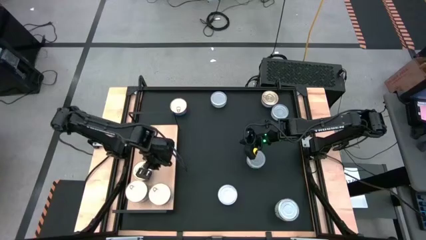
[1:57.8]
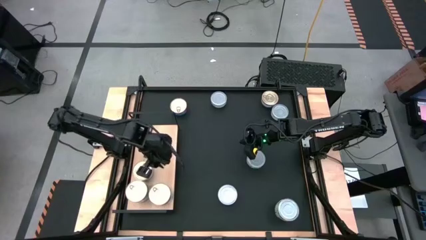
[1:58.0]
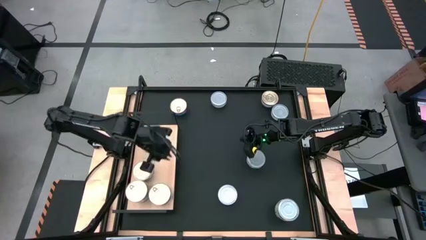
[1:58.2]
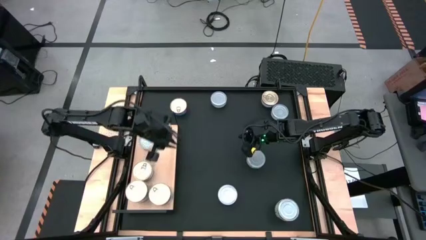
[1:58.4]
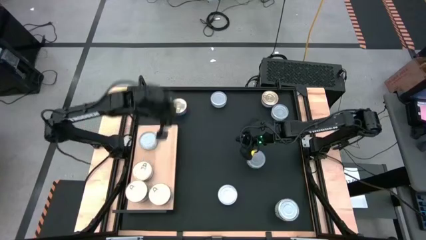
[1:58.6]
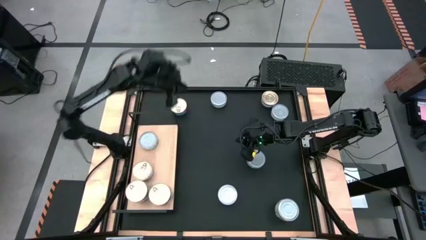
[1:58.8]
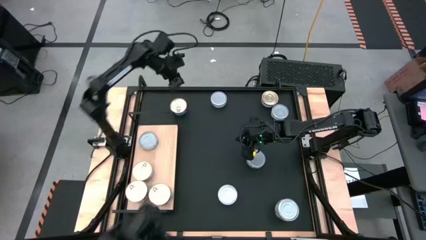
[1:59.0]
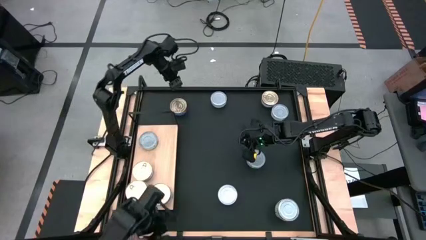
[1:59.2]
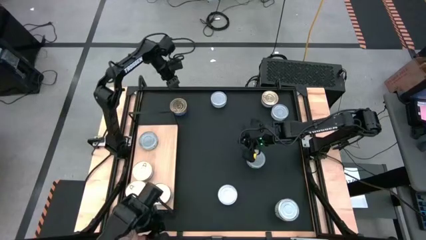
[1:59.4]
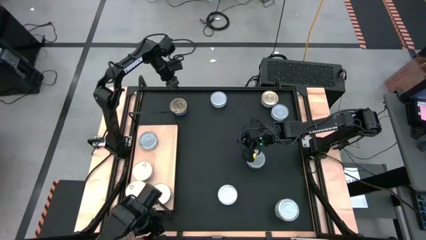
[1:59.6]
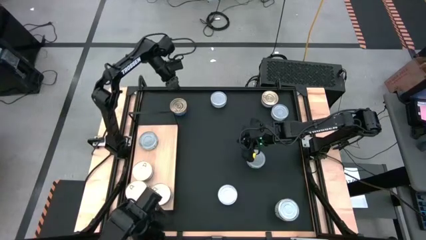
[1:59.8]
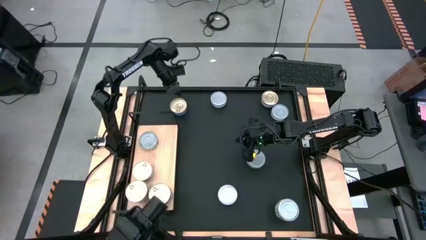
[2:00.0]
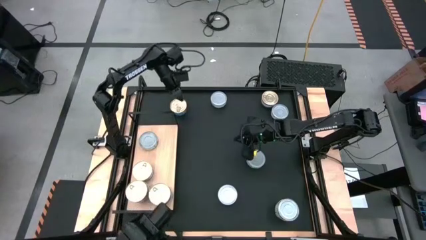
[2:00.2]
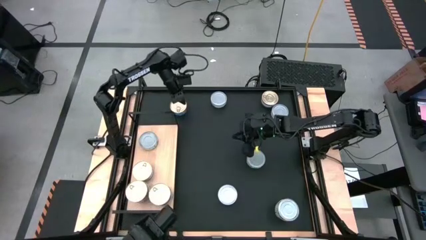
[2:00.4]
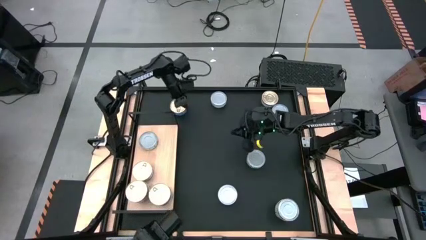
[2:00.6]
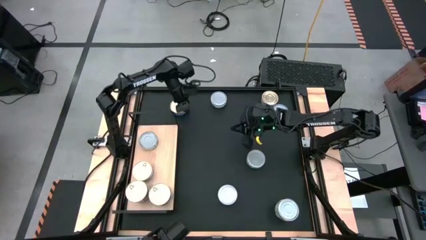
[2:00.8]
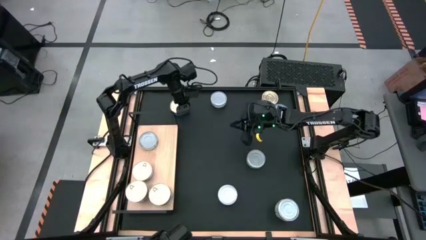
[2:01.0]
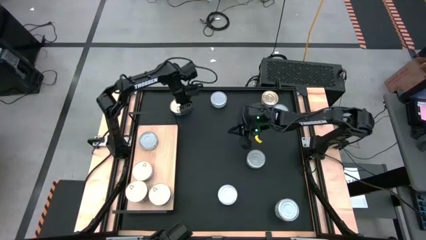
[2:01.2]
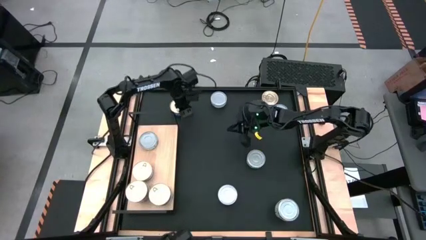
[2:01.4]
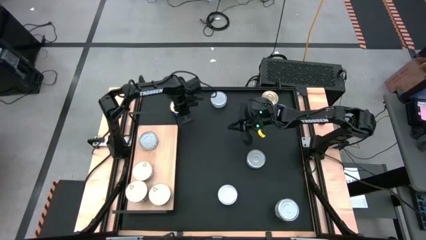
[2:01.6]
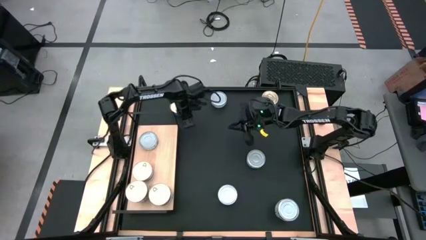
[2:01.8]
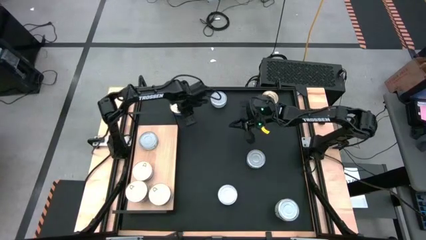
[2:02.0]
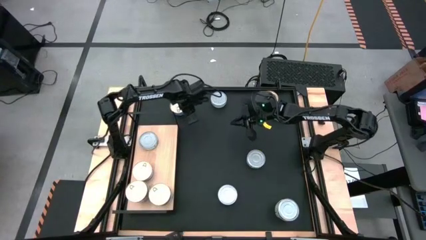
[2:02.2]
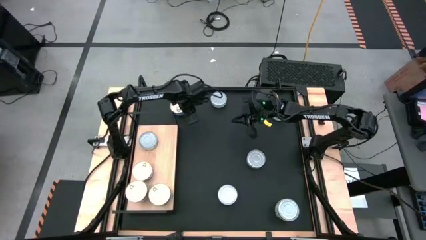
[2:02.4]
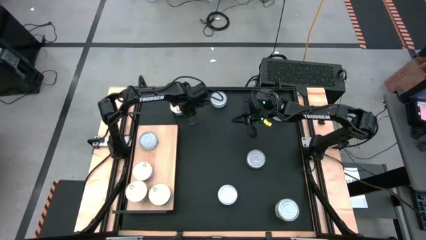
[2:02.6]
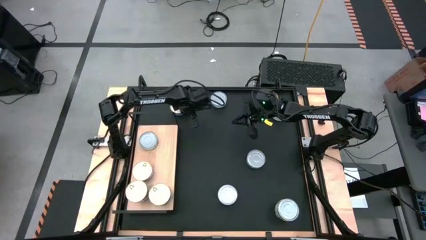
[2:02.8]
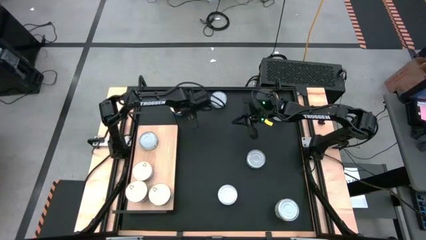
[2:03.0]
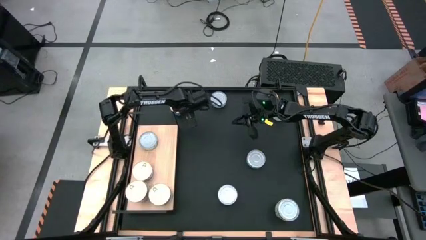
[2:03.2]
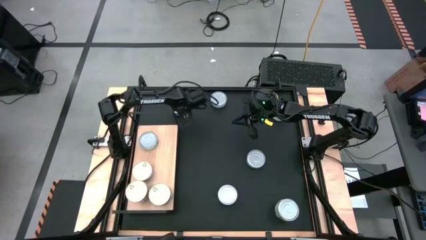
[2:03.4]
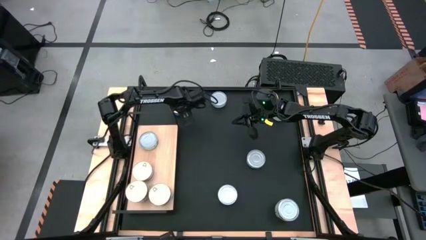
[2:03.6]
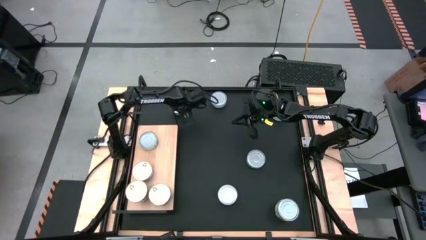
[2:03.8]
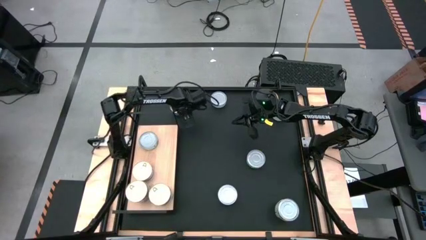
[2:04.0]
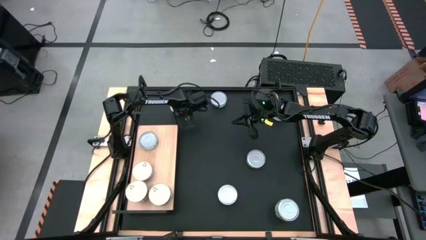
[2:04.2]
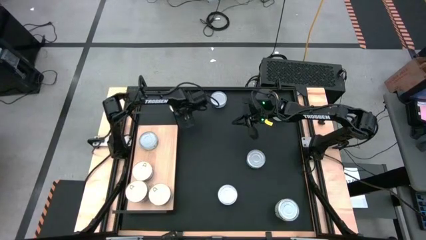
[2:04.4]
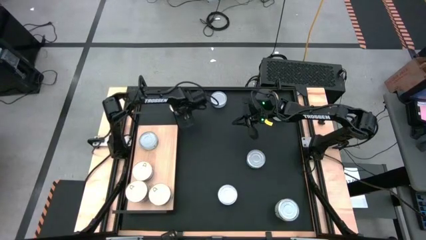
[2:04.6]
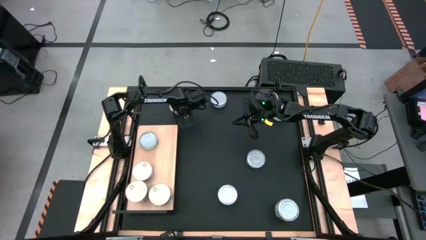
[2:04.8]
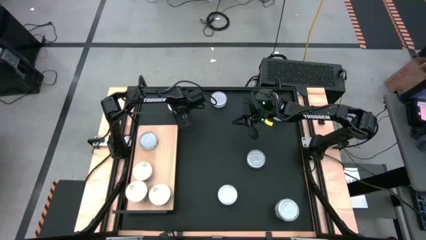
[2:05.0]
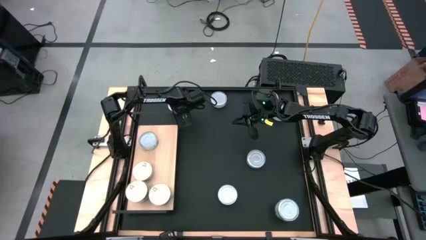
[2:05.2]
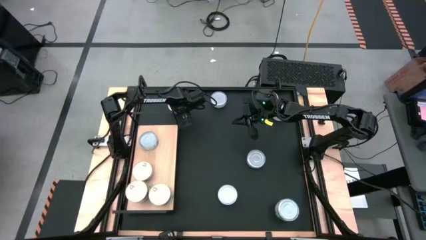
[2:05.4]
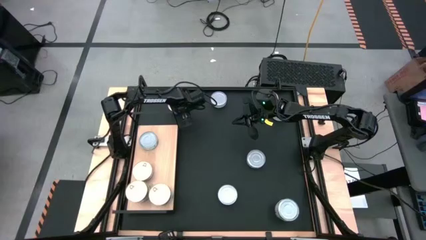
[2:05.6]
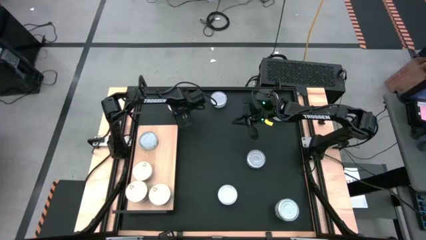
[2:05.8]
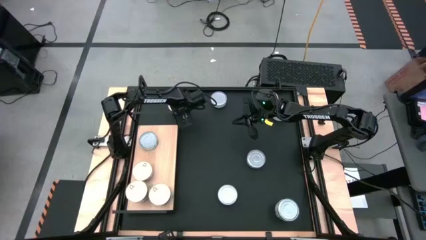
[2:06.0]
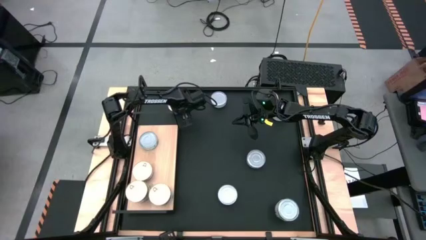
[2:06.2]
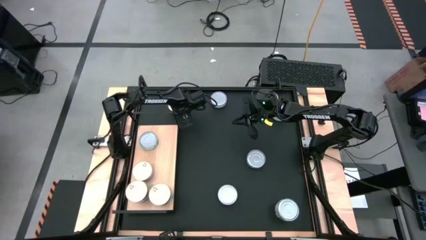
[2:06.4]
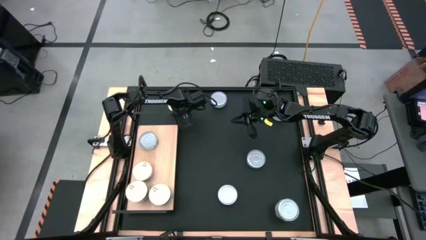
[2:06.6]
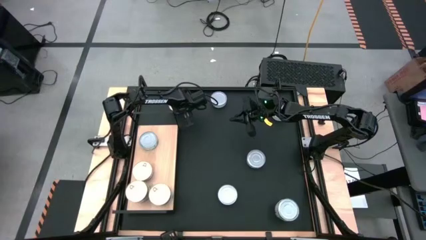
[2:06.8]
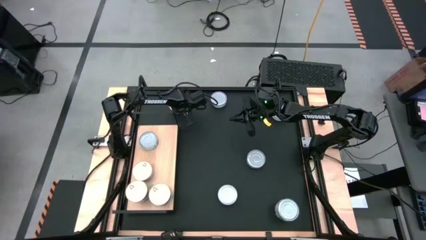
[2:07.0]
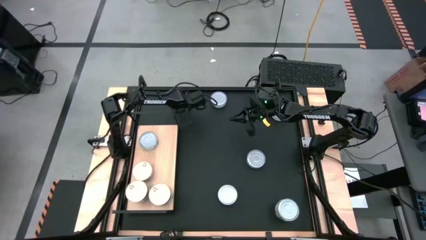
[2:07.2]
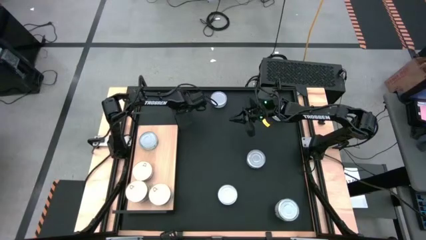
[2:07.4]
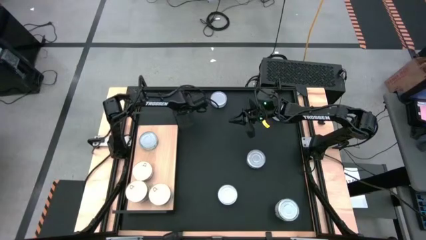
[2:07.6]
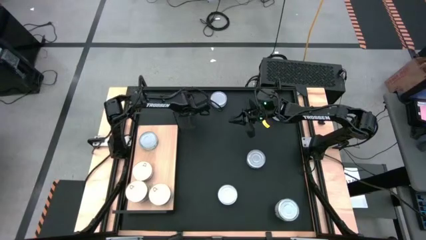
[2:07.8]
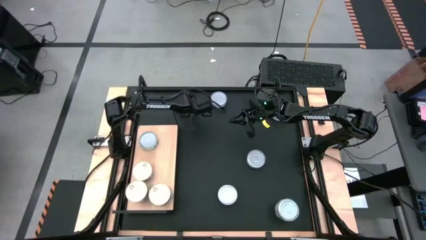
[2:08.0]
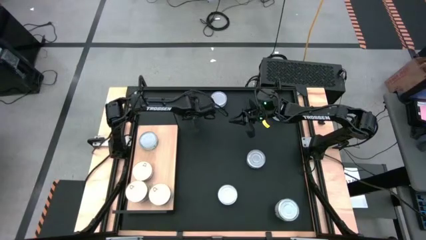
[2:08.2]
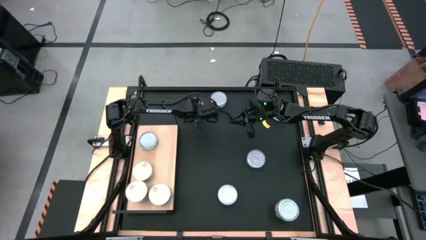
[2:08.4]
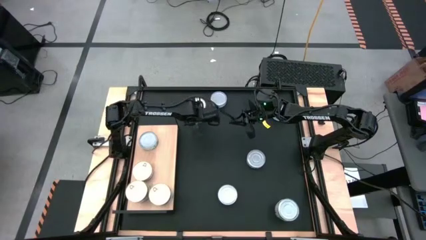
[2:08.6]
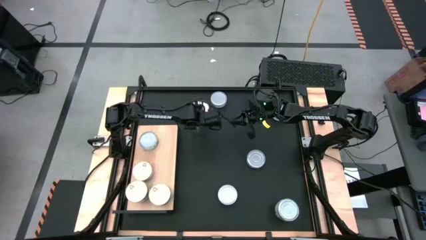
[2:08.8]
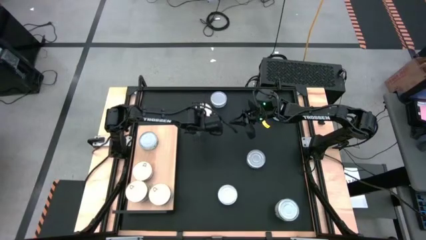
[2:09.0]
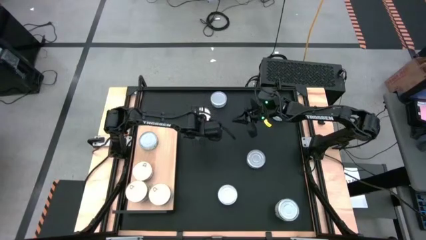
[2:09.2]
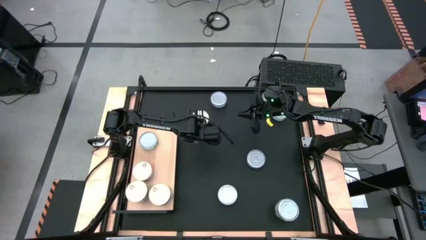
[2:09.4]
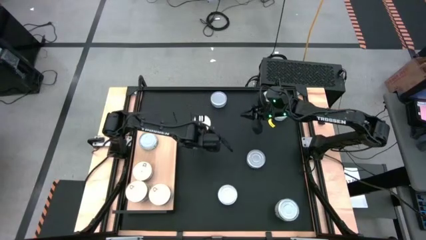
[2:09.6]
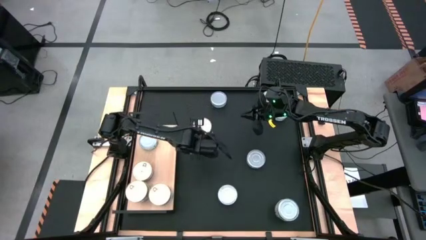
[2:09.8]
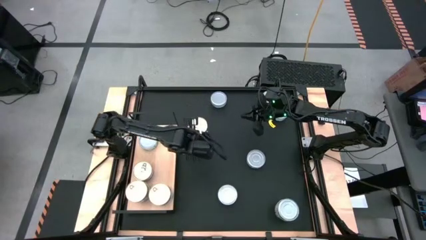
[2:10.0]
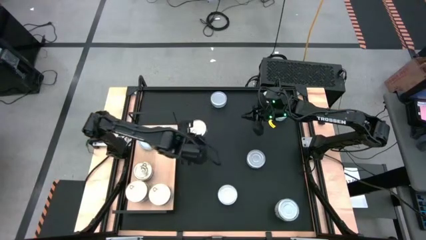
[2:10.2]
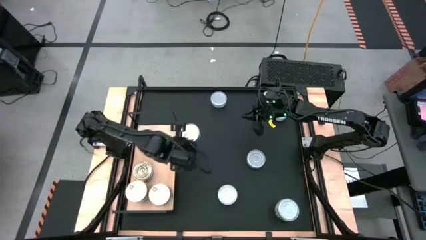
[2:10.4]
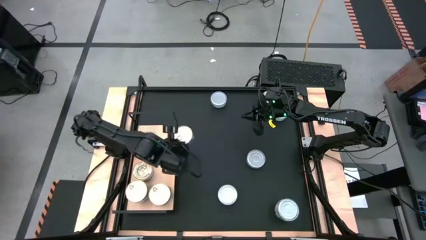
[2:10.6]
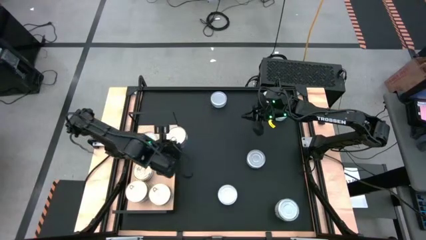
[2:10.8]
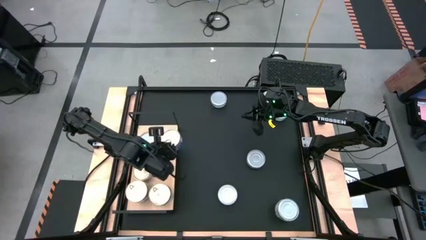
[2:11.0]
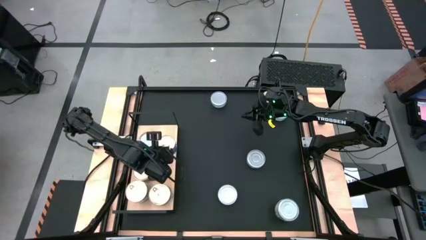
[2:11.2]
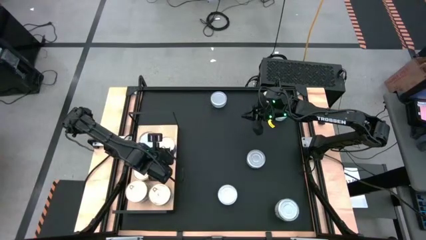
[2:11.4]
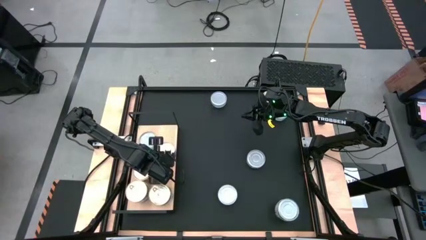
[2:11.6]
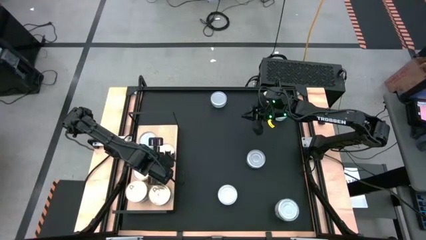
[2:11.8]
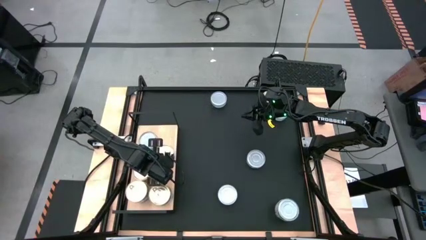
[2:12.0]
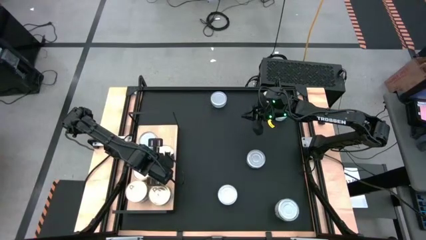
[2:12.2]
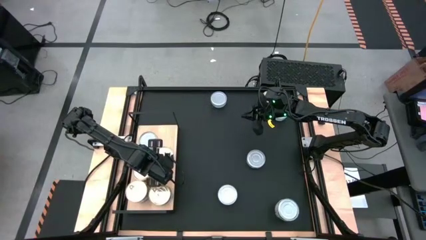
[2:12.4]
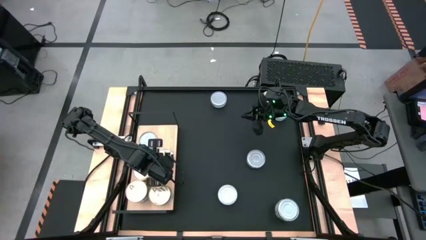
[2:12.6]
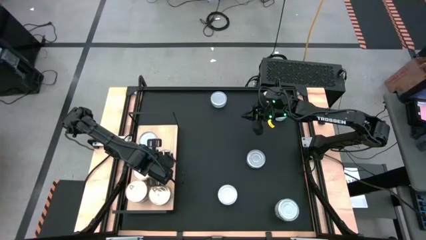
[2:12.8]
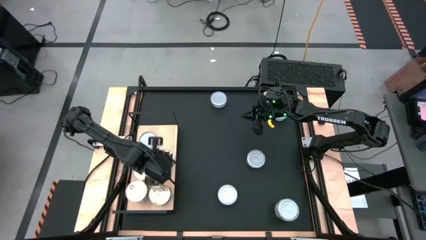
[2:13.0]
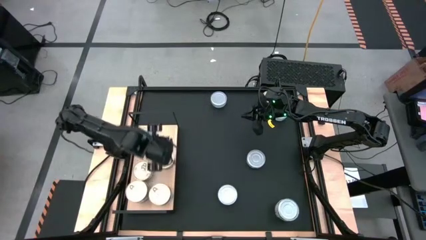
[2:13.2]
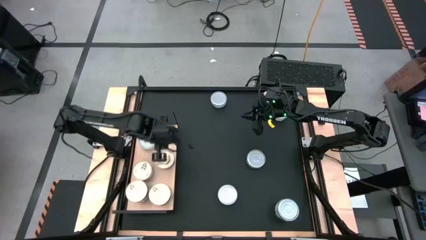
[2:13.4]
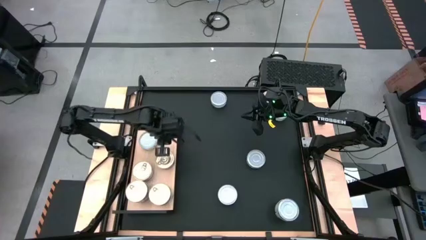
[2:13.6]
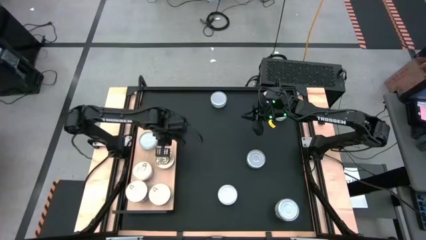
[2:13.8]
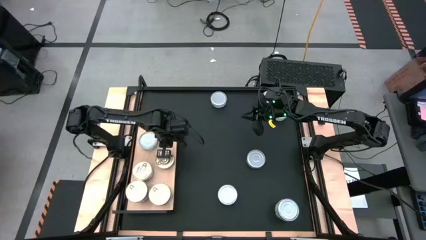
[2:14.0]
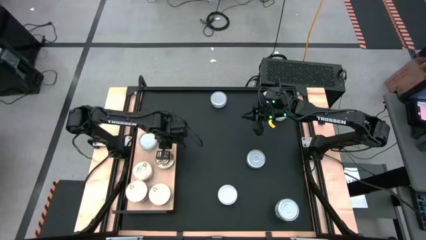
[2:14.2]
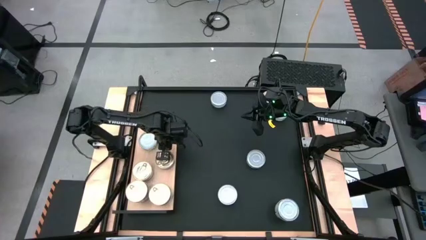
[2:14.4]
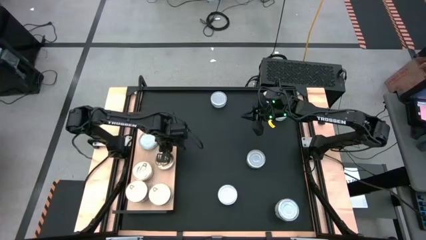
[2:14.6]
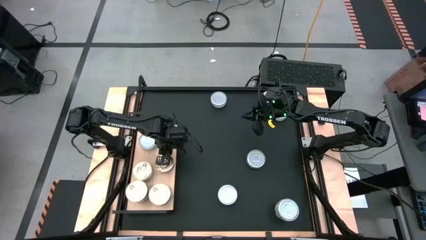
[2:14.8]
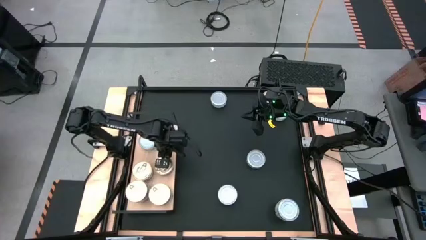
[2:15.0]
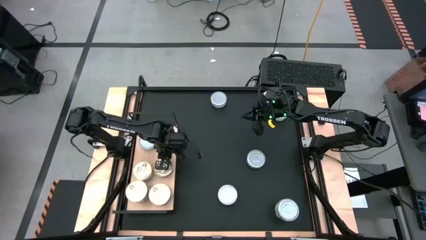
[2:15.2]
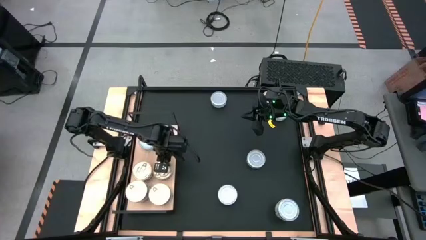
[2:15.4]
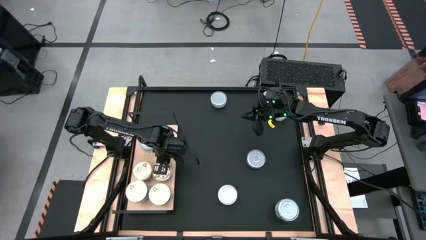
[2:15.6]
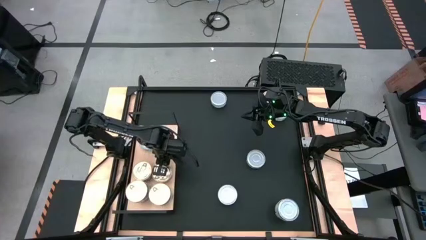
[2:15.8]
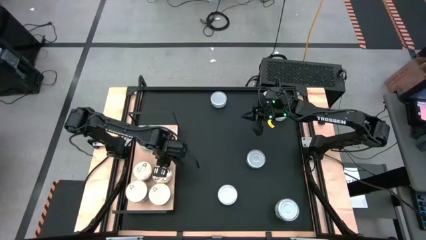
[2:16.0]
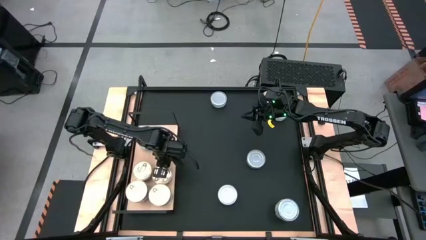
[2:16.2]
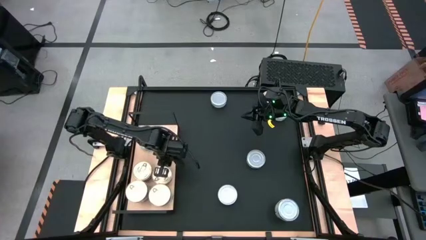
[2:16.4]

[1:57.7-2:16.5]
Task: Stack canned seafood by type on shelf
Put the blue tuna can aligned with the other blue tuna can on the shelf
